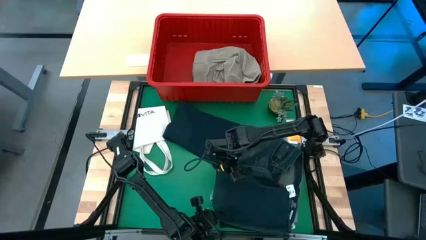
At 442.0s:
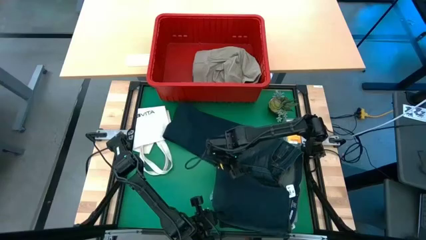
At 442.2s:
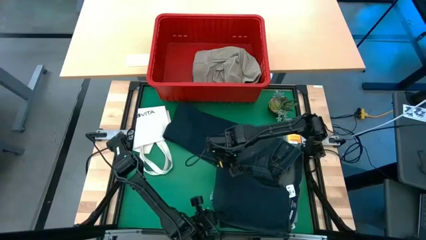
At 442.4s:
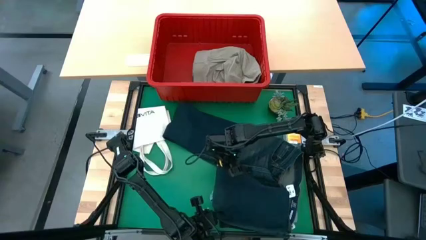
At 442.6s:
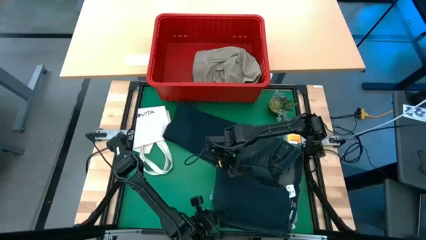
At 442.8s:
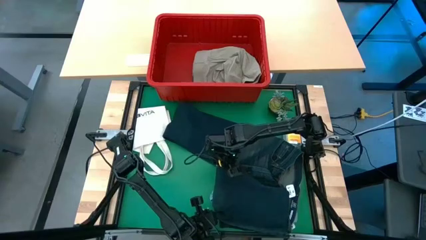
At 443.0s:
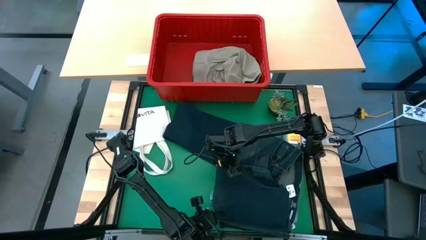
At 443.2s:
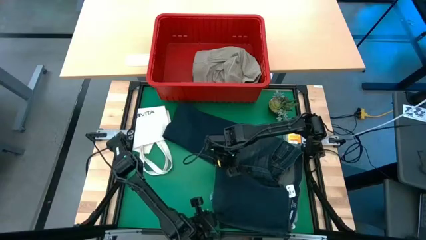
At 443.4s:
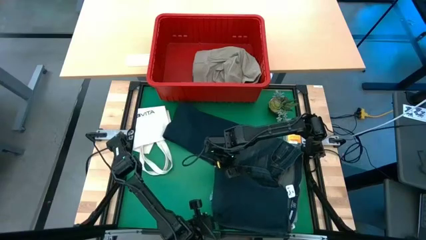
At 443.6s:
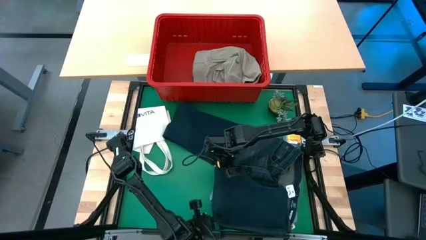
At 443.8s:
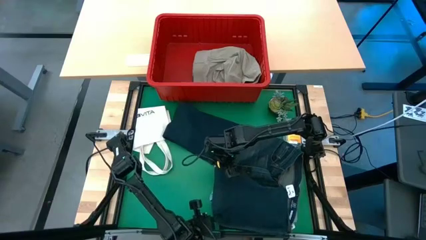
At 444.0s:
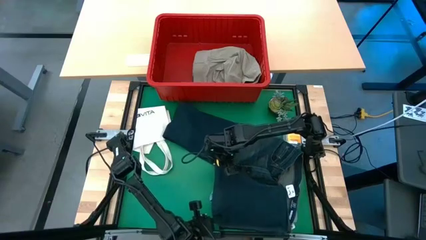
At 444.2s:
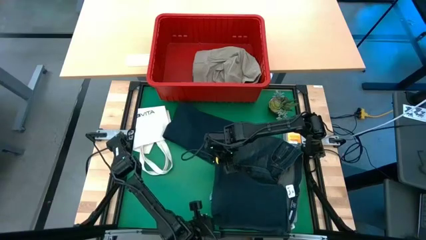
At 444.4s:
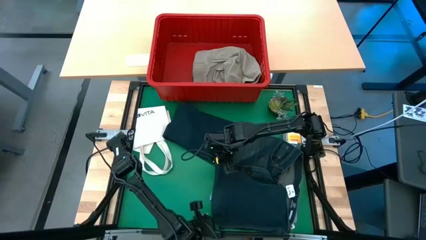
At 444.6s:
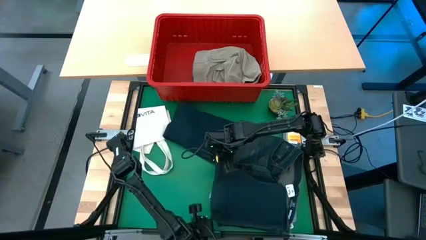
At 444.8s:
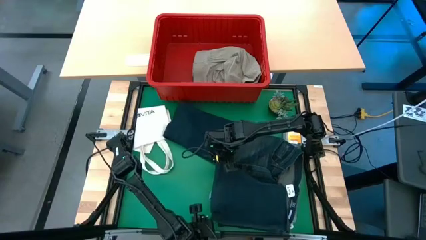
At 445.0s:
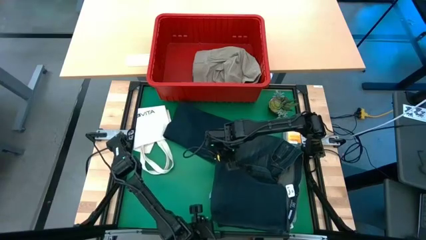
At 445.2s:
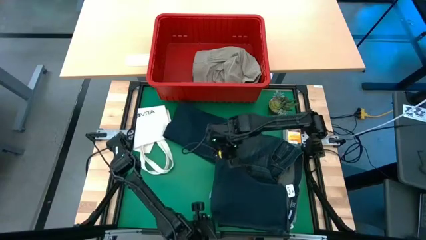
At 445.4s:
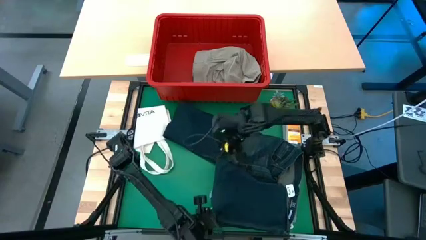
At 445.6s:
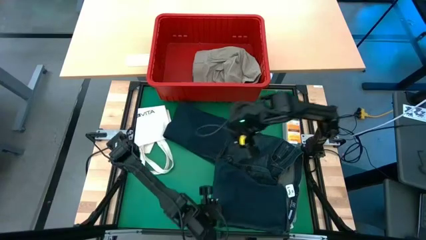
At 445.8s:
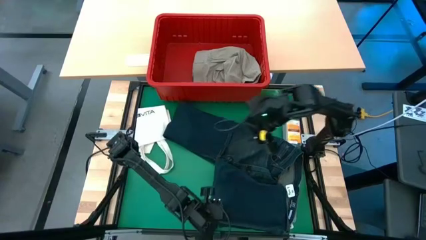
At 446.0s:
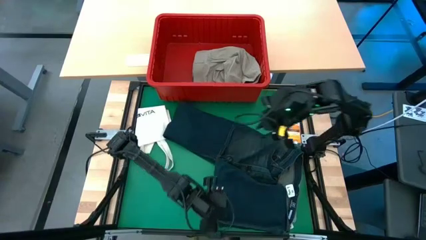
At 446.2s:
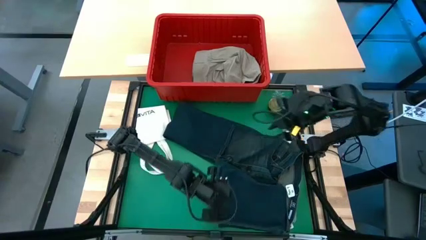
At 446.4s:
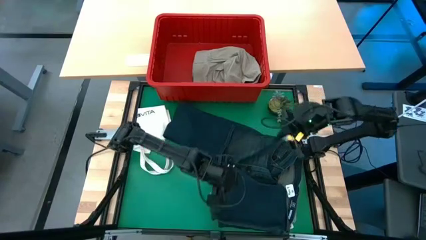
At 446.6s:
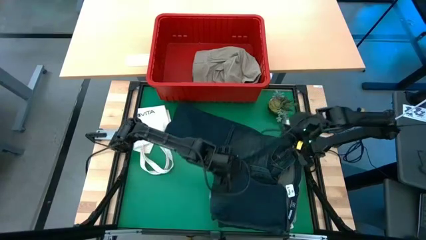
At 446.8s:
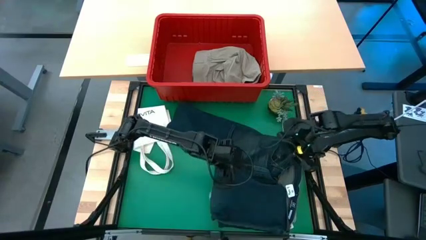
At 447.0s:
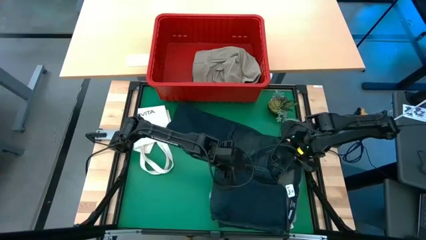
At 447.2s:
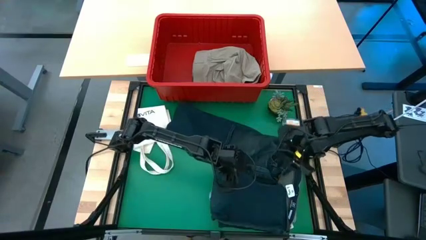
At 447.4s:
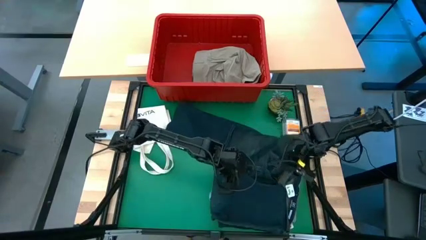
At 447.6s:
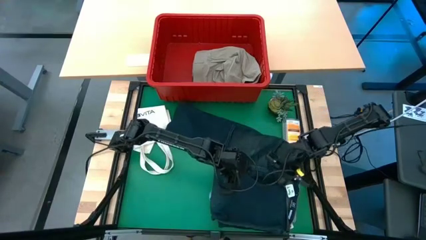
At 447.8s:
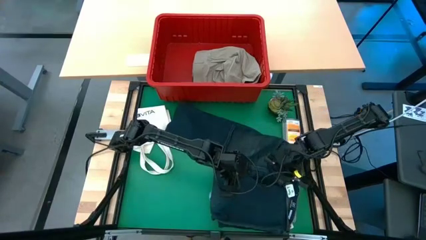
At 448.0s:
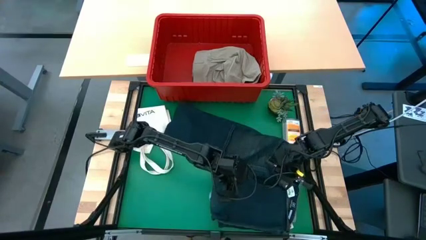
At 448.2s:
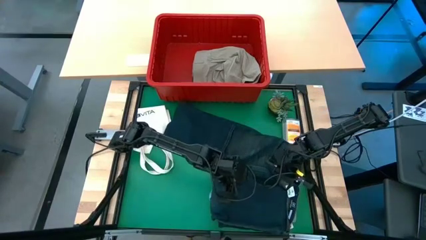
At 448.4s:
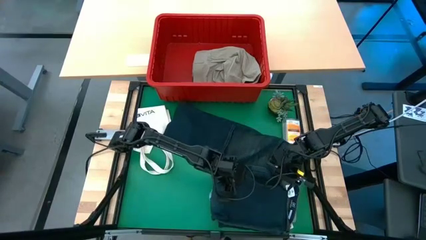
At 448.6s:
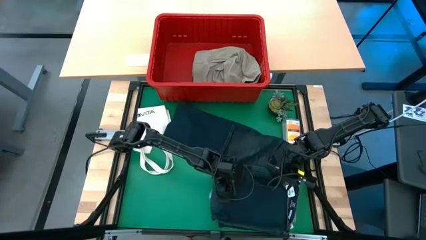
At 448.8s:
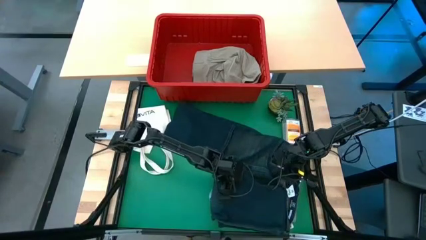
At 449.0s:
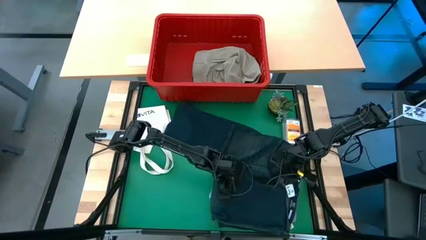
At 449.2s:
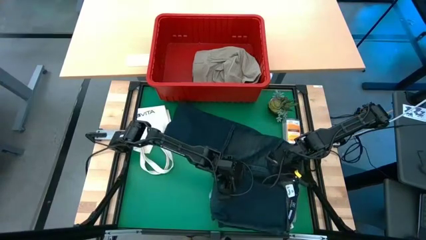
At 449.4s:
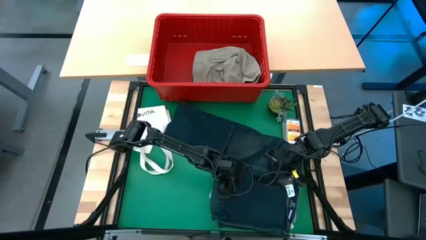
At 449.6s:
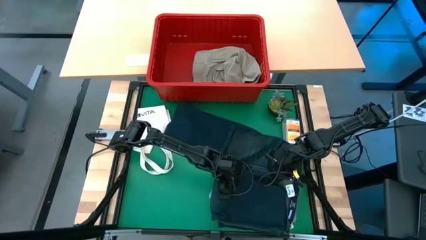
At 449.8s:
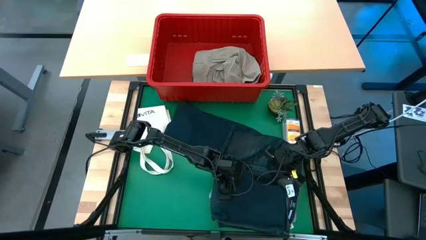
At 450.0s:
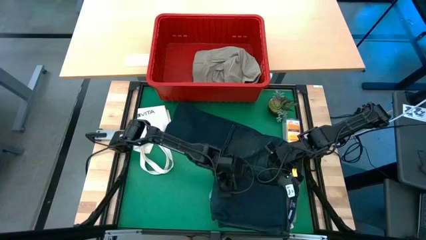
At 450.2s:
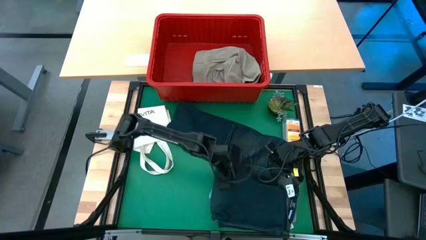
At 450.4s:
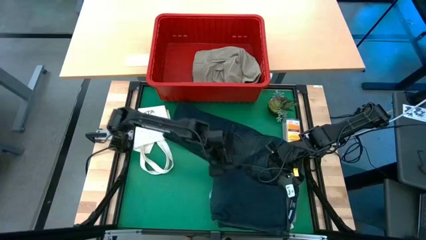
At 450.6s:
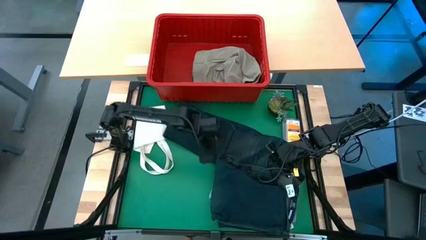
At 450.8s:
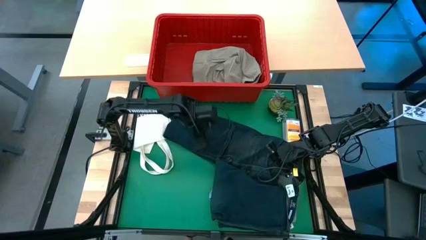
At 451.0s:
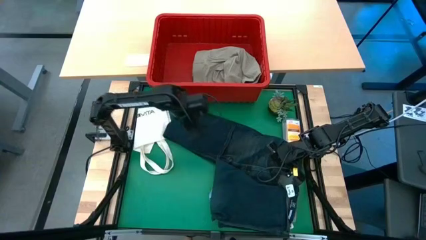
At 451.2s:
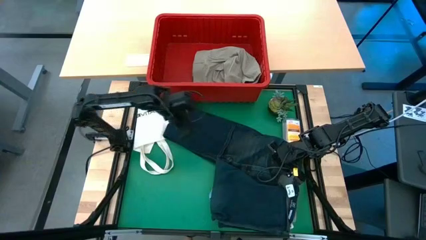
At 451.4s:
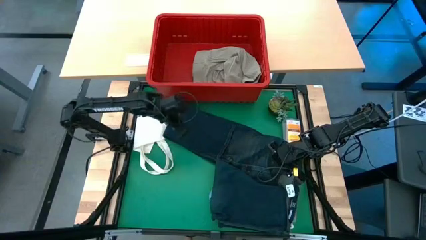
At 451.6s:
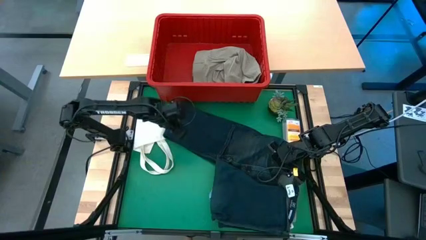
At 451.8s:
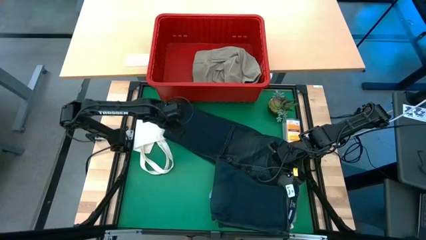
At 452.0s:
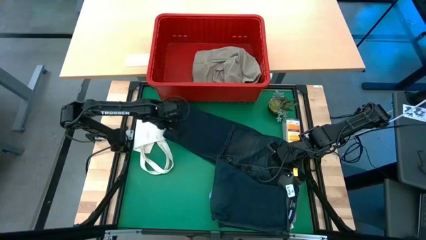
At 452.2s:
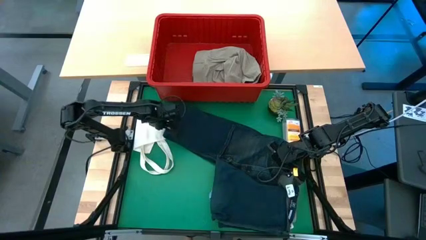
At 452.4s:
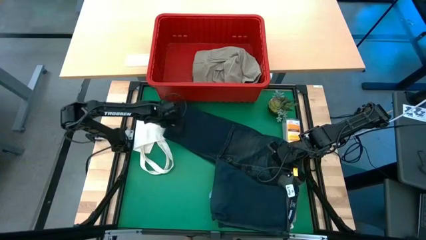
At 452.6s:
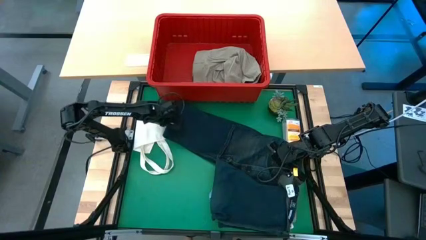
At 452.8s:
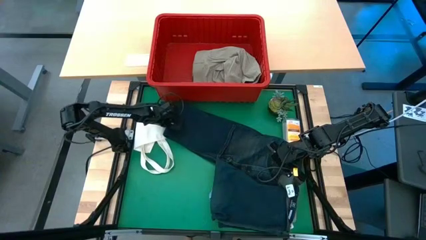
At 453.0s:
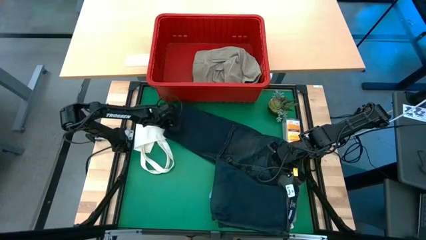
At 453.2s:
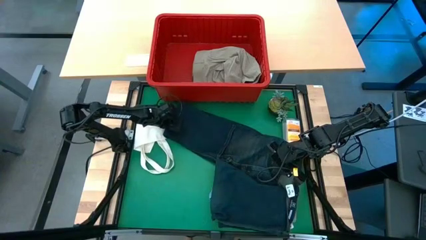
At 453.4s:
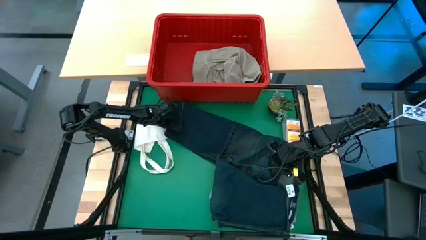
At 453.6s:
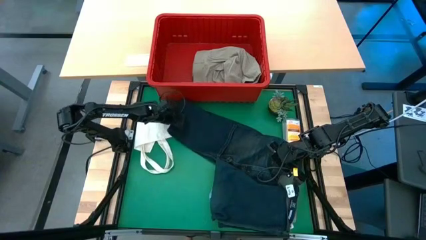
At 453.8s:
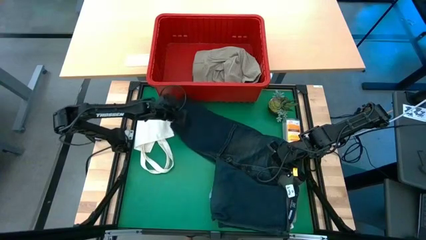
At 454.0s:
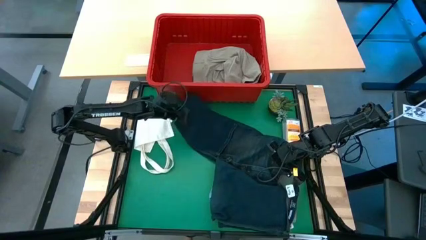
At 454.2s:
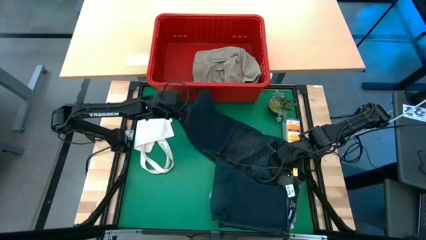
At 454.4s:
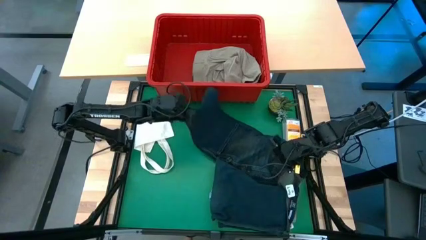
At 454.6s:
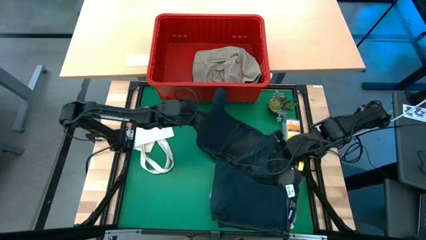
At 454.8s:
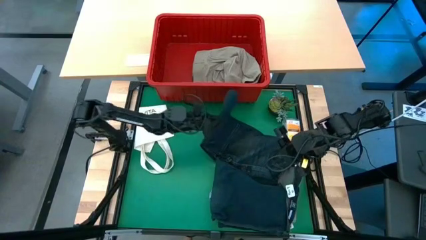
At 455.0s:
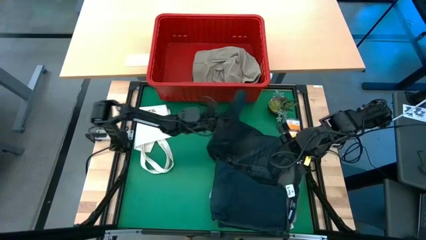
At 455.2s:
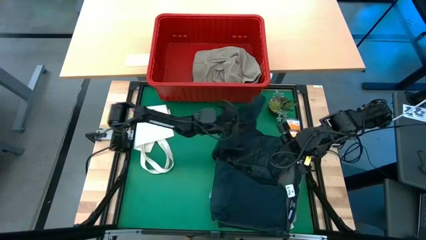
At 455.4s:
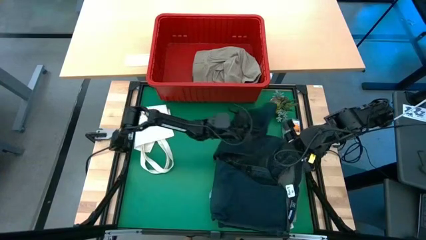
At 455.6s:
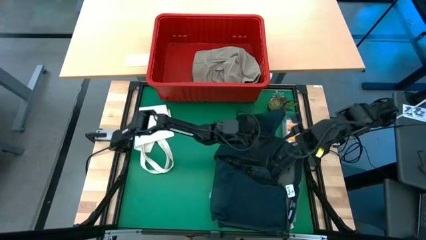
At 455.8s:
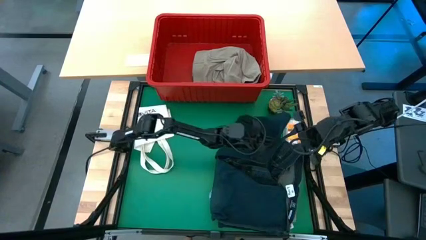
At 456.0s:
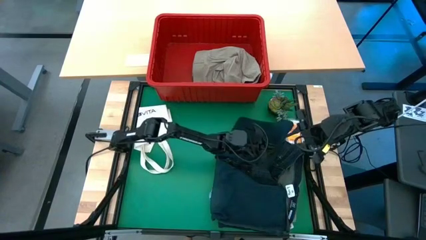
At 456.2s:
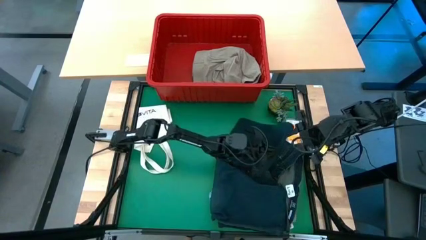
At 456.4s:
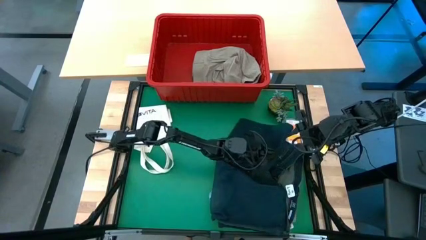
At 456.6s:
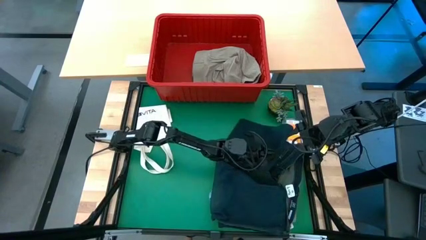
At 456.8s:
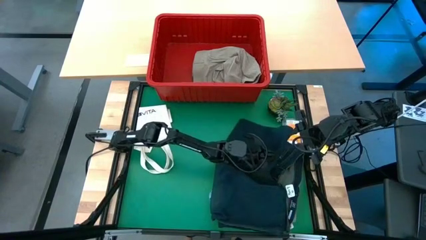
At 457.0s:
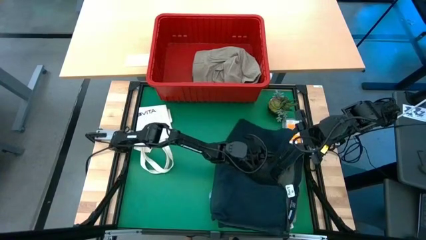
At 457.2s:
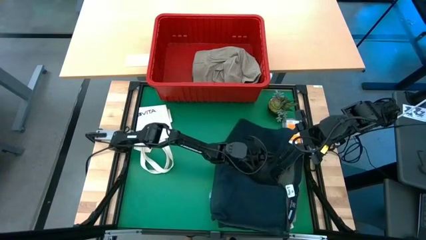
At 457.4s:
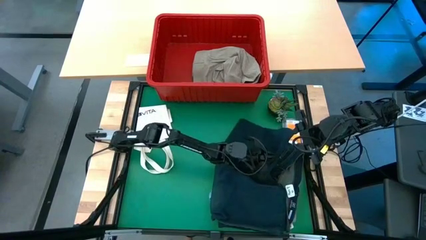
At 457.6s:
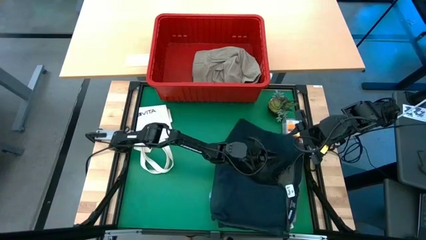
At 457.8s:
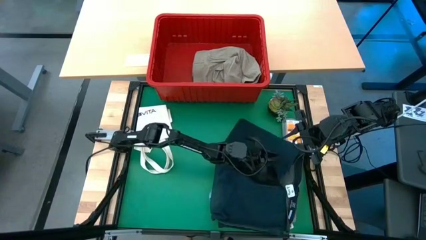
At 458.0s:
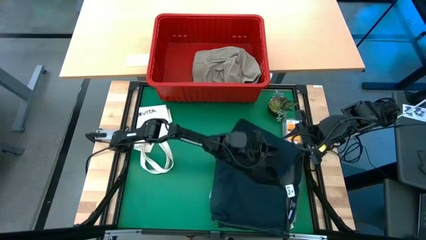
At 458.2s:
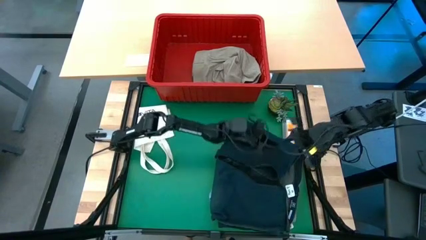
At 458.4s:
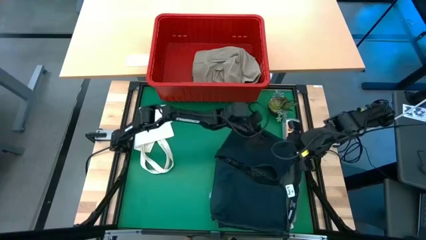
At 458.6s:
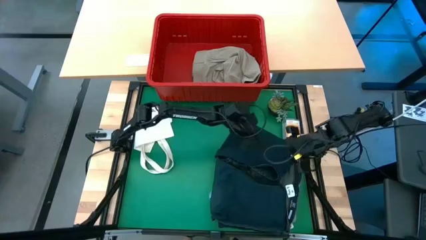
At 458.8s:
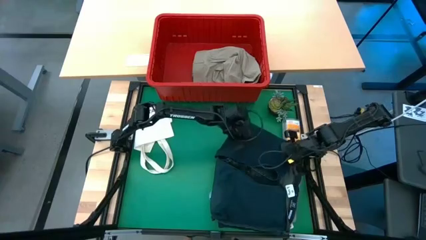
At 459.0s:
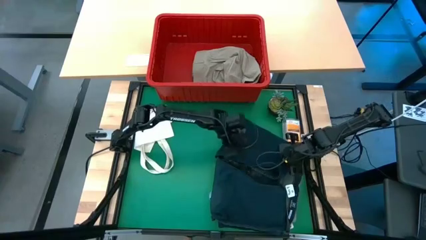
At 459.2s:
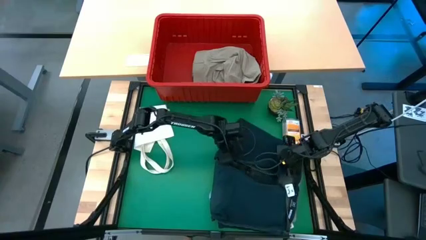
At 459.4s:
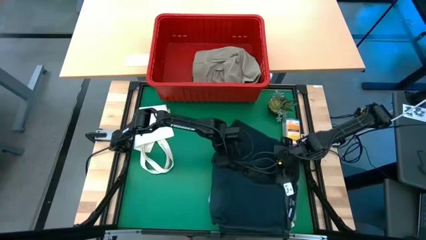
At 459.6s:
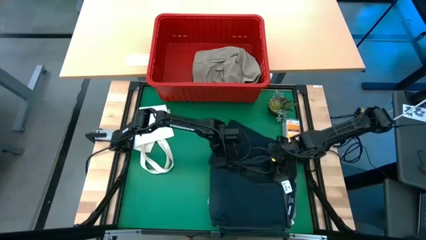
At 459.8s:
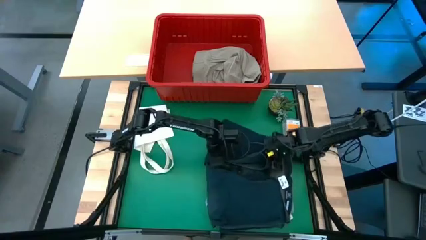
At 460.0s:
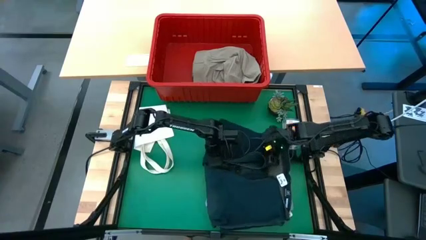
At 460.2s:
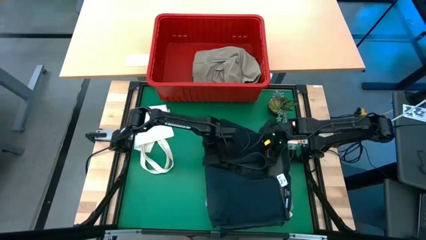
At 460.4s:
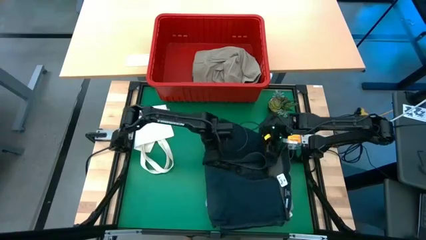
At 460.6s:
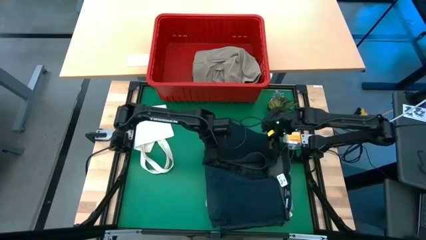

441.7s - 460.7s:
Task: Fold Laundry from Bin
Fold the dark blue jeans
